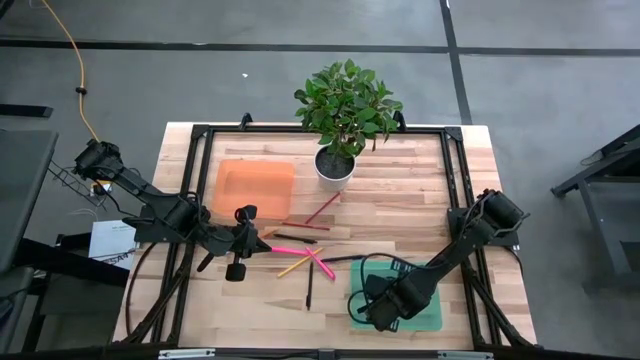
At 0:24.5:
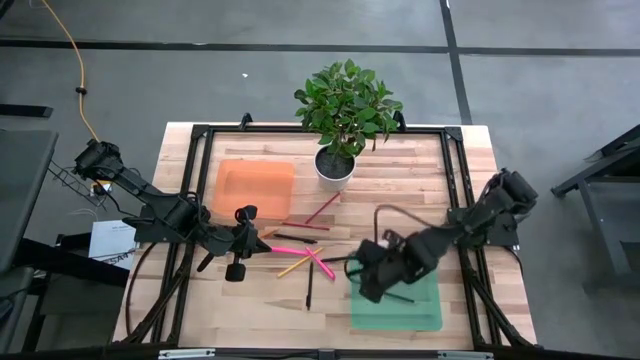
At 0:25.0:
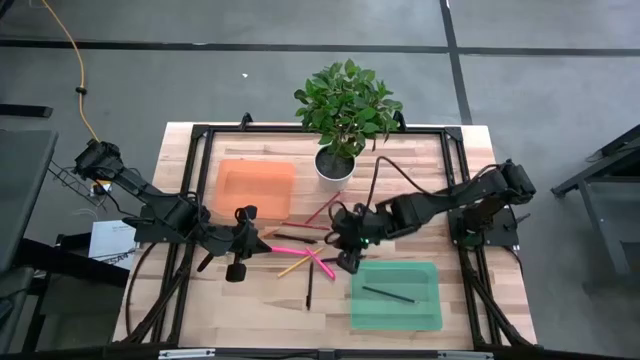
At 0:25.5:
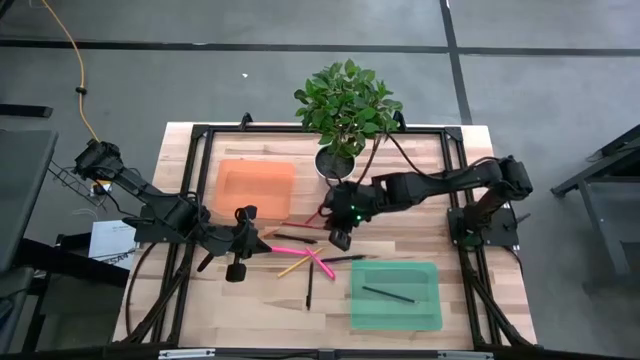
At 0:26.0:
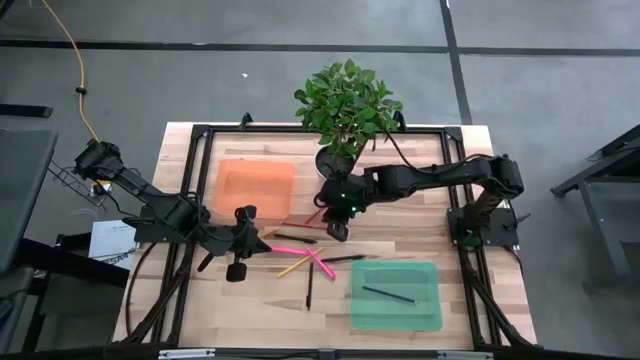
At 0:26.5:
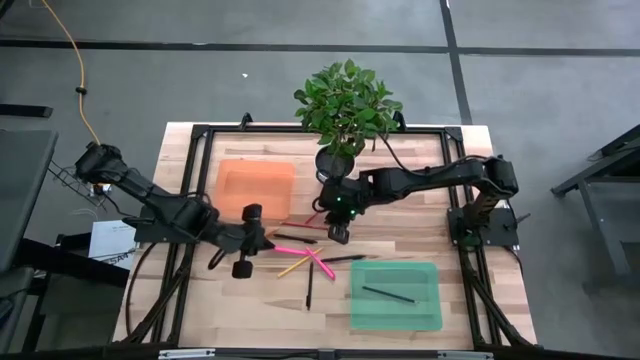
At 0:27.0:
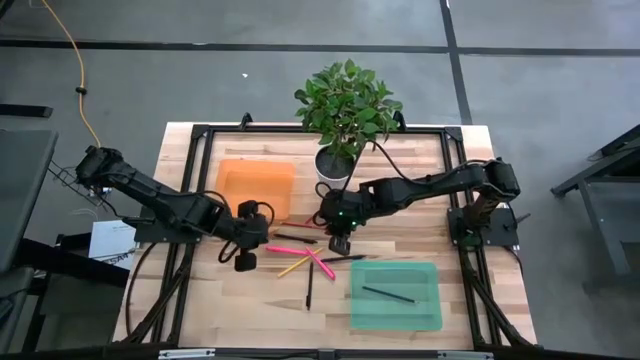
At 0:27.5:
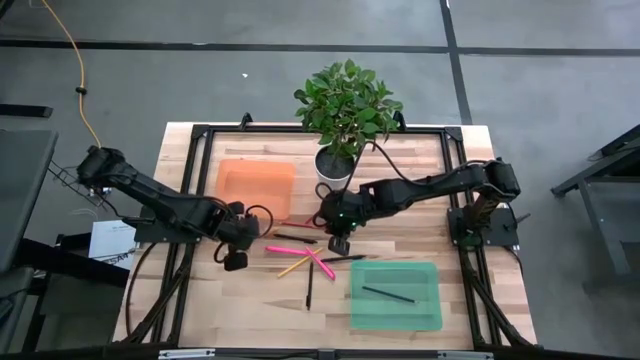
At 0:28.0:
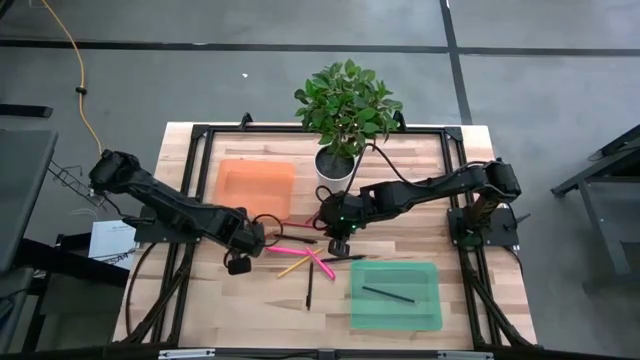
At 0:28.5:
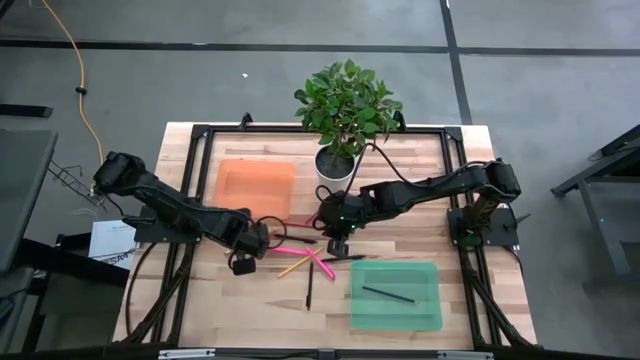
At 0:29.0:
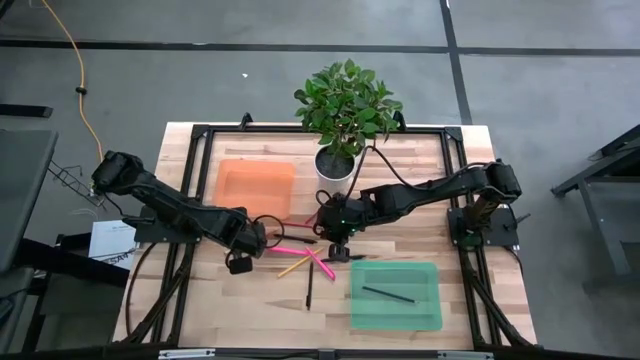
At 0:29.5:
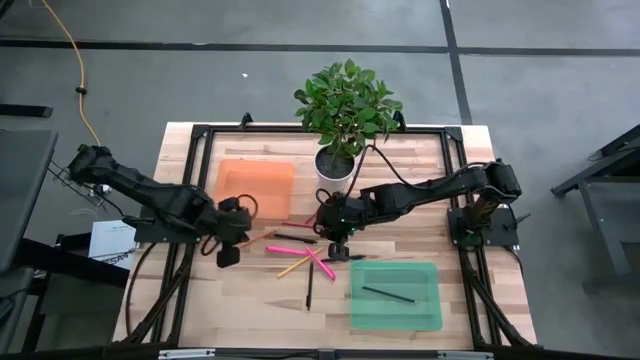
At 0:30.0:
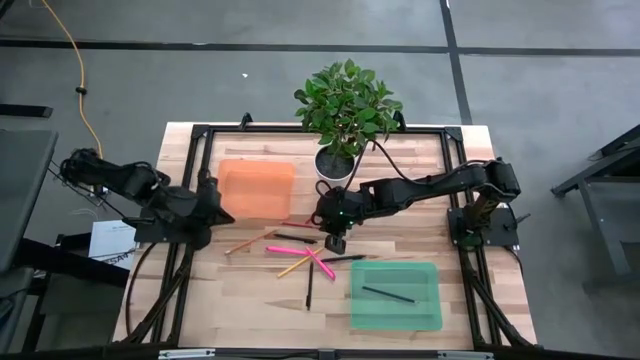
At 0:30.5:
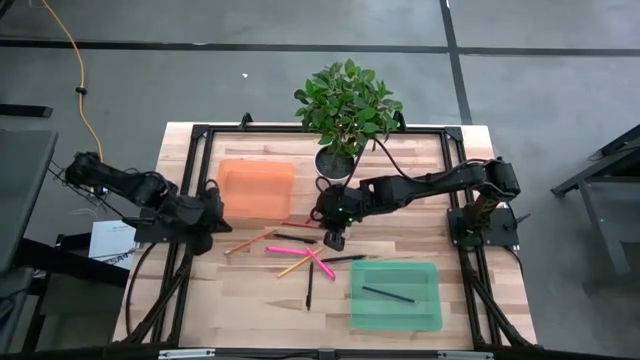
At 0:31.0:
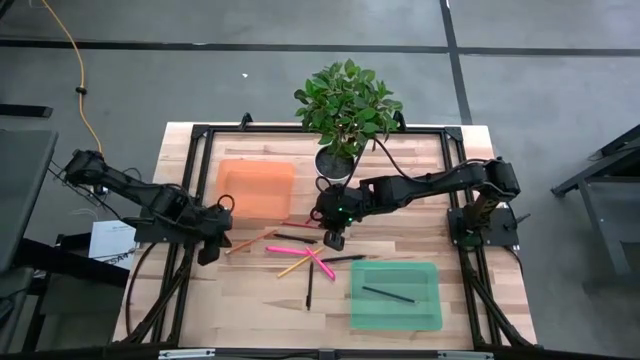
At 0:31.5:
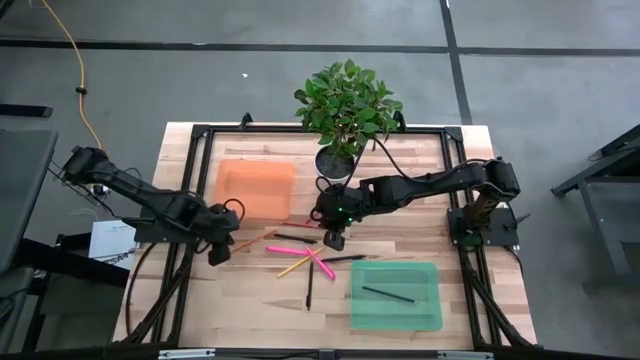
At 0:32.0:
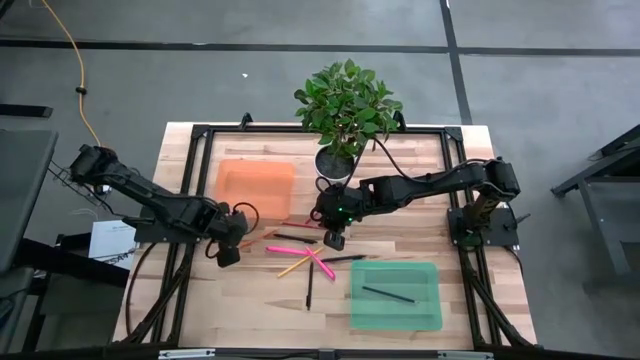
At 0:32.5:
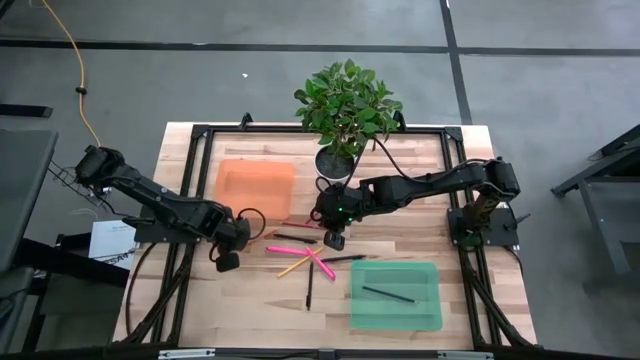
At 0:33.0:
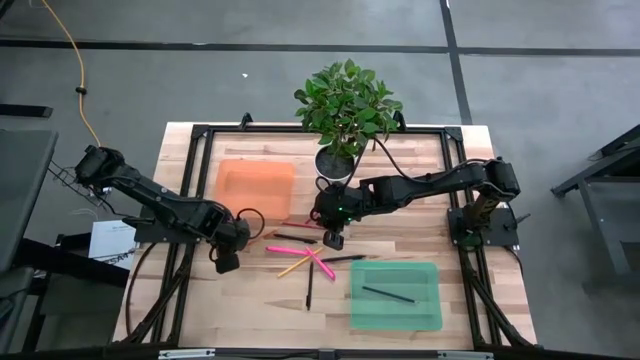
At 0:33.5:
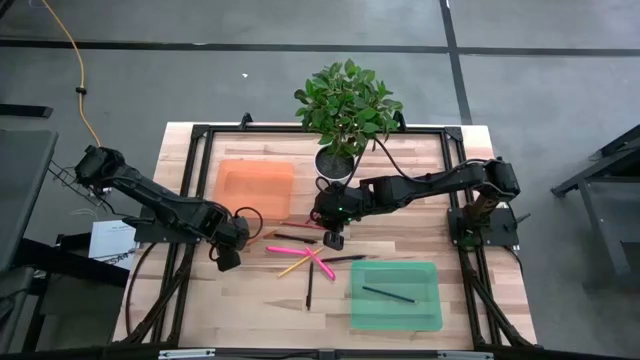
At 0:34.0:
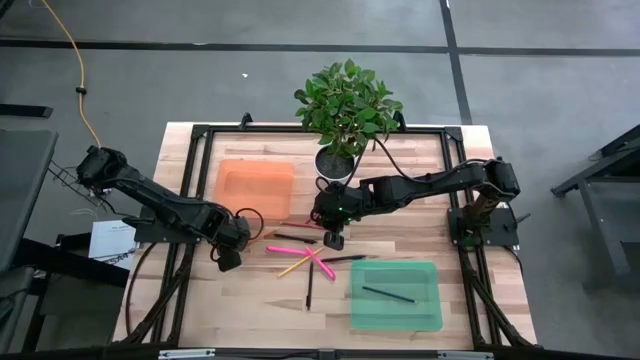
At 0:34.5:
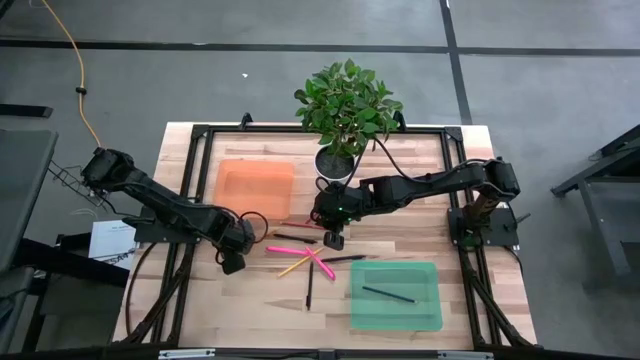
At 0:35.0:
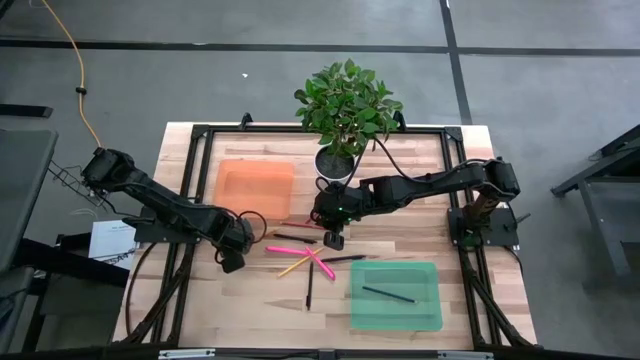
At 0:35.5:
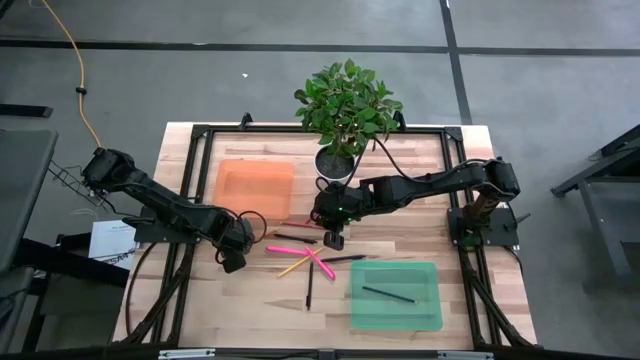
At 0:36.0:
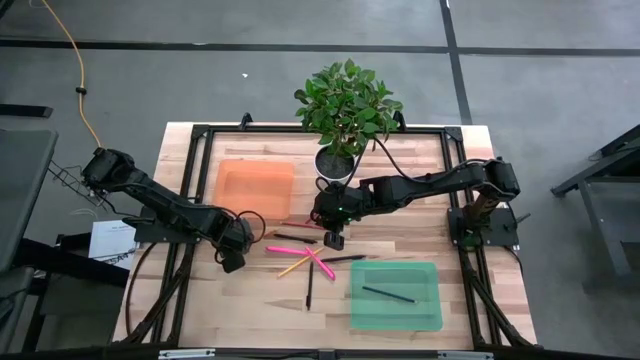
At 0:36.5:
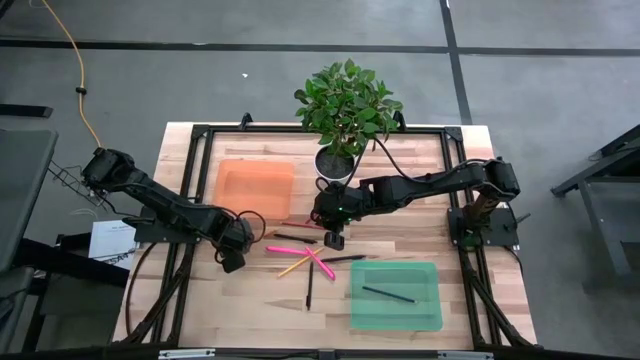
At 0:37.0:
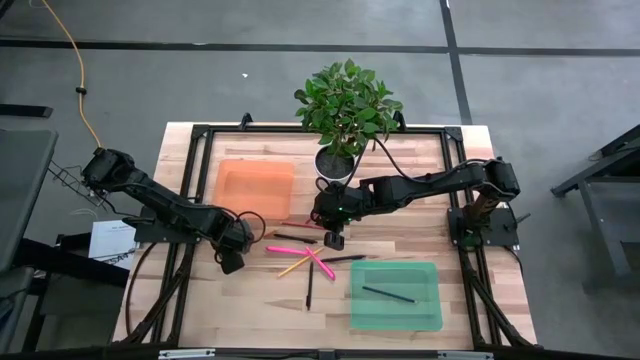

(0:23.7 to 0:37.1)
Task: Sort pens & pencils
Put the orange pencil into the green bin
